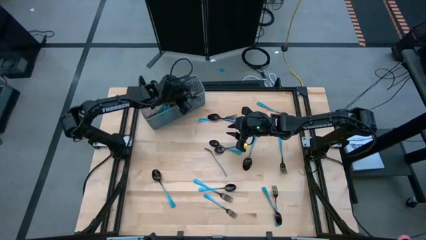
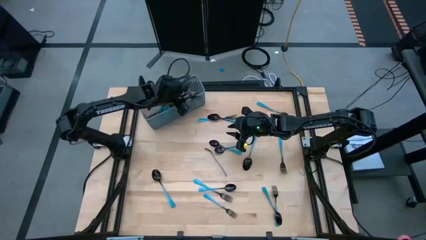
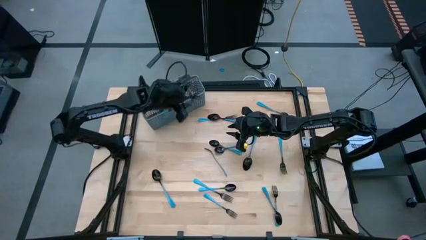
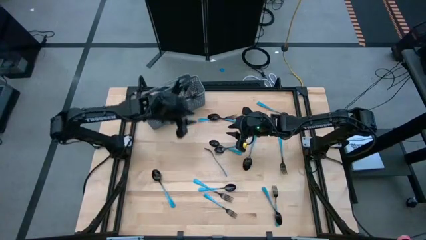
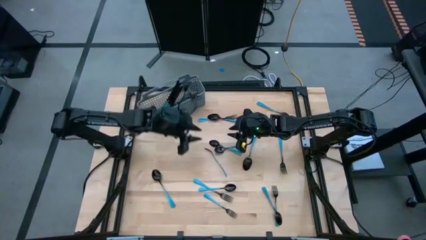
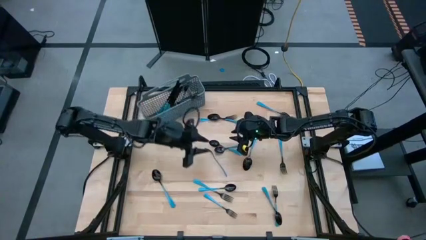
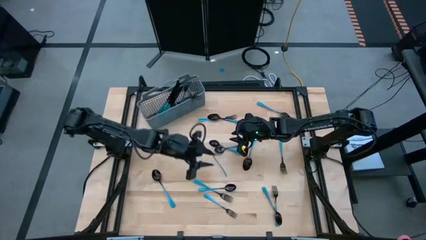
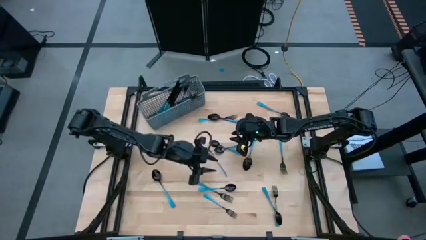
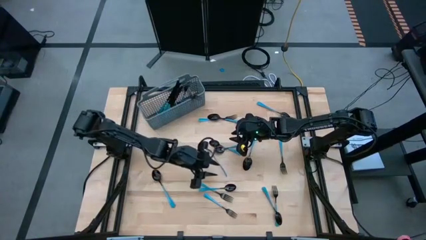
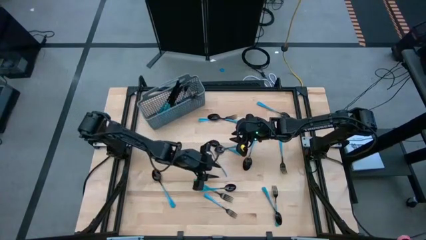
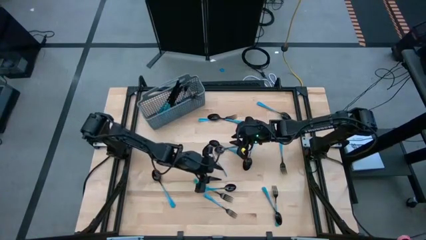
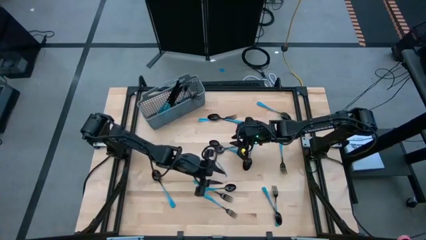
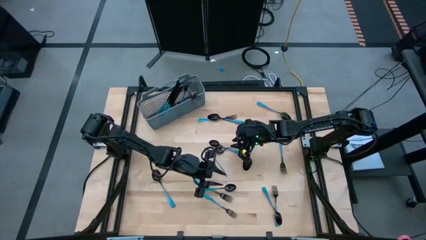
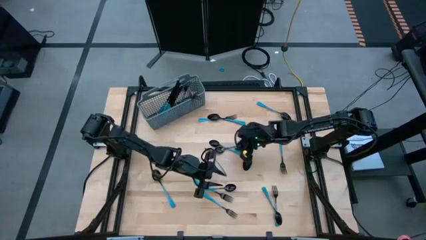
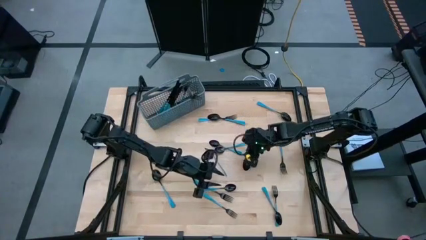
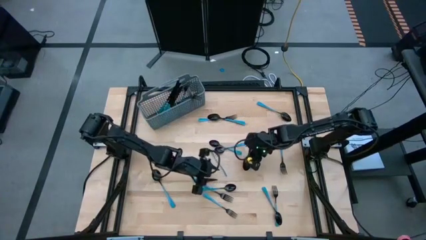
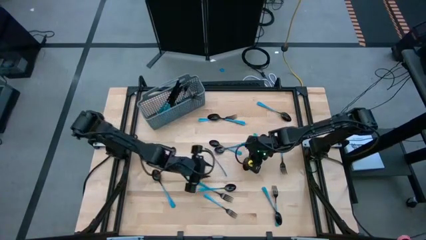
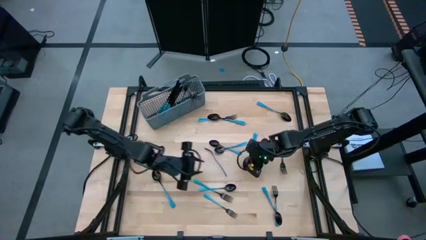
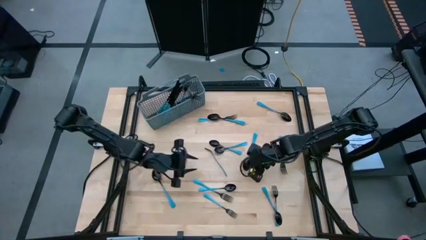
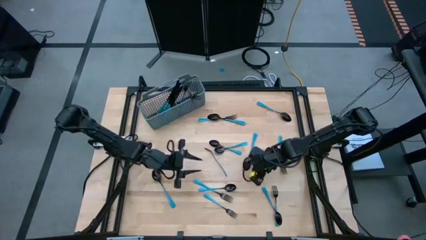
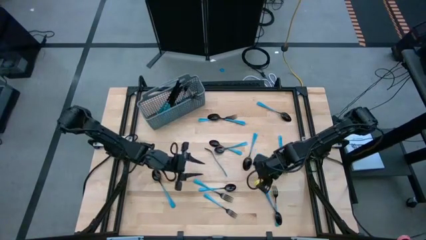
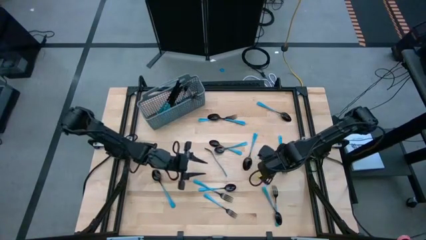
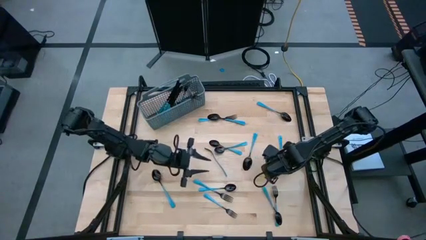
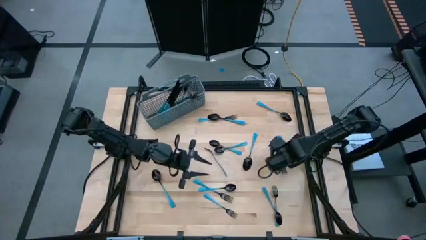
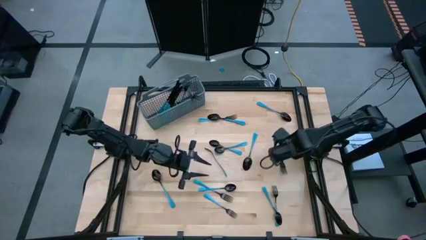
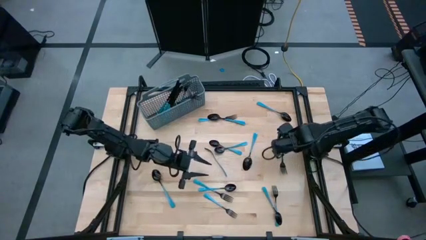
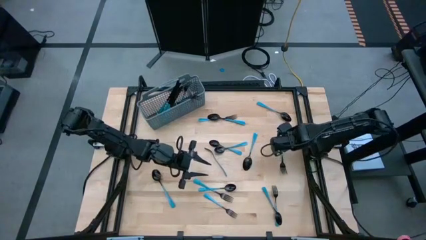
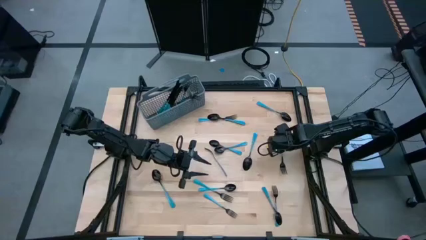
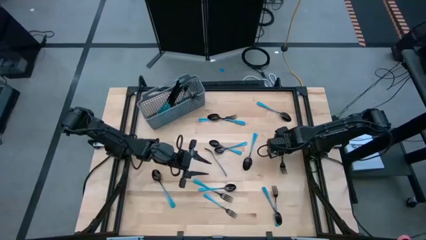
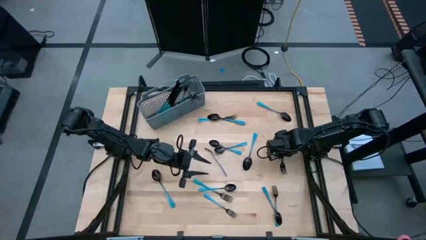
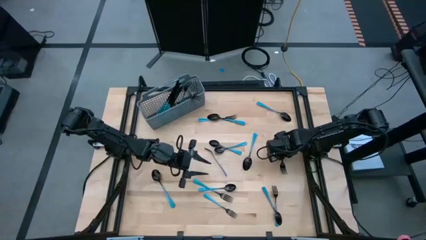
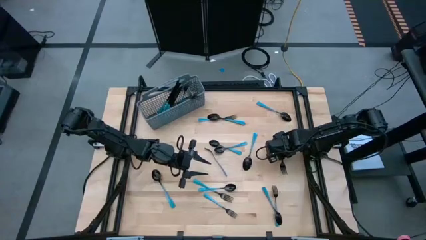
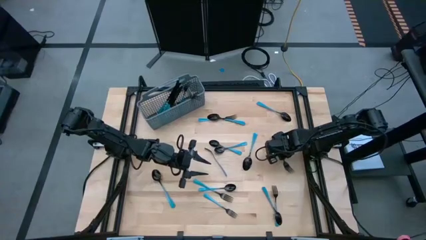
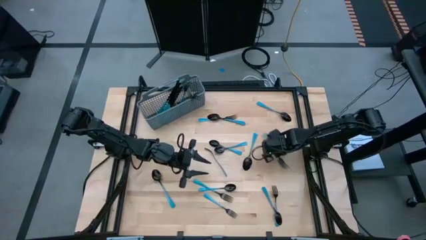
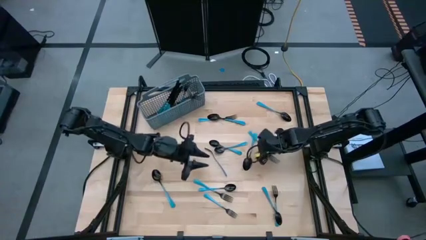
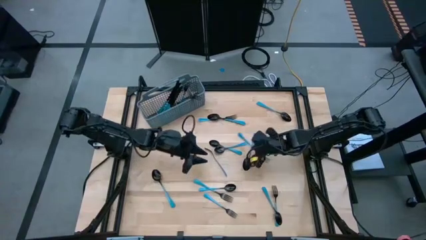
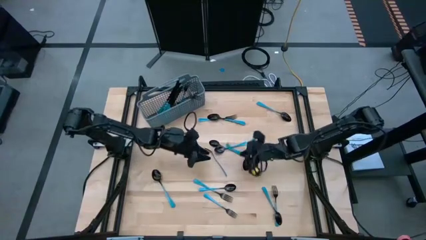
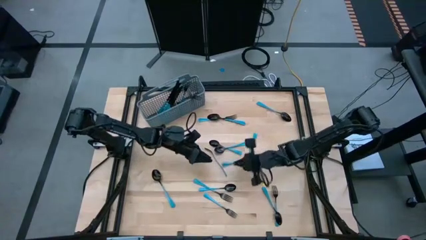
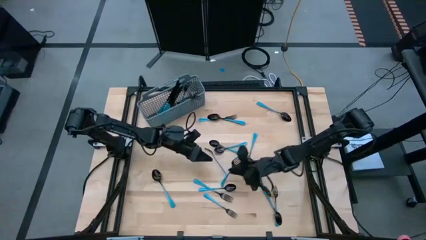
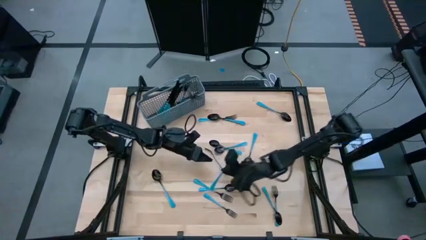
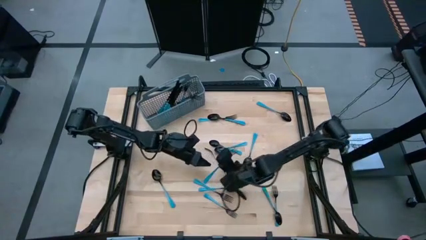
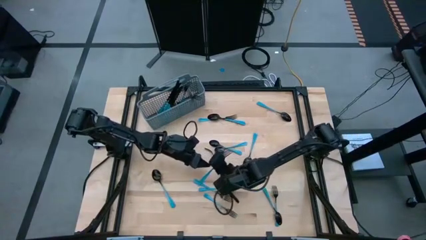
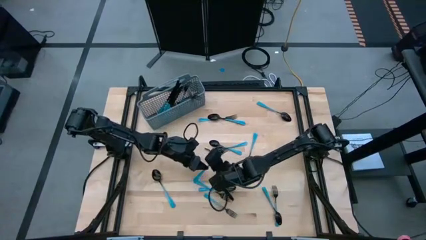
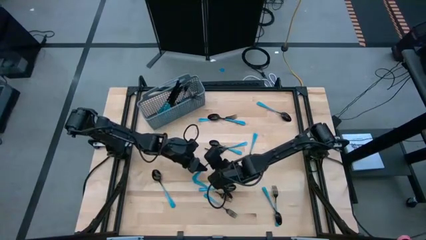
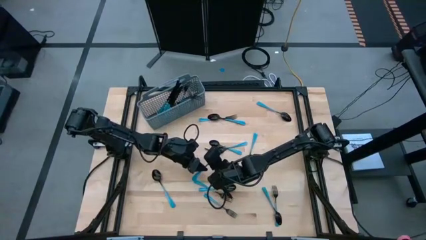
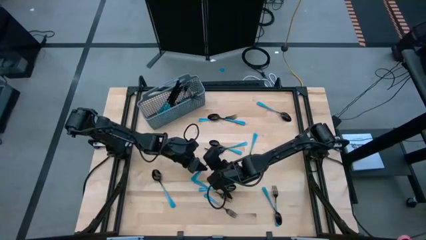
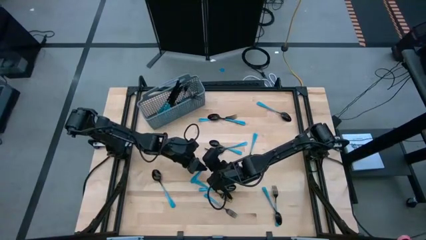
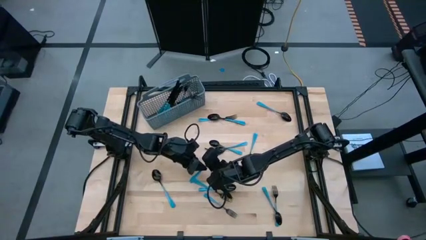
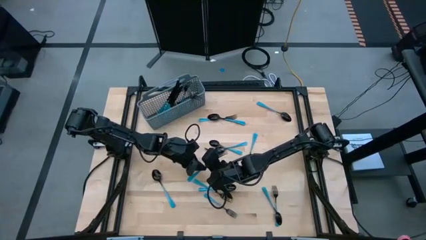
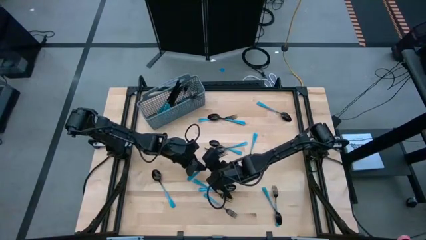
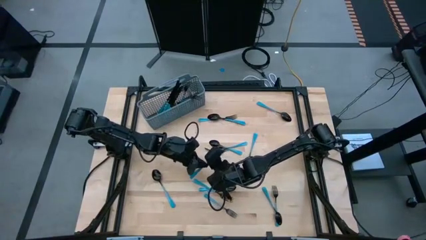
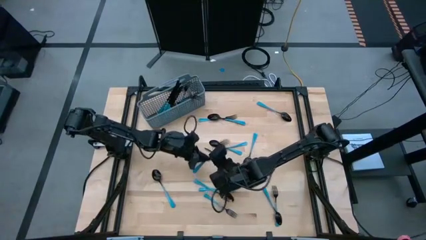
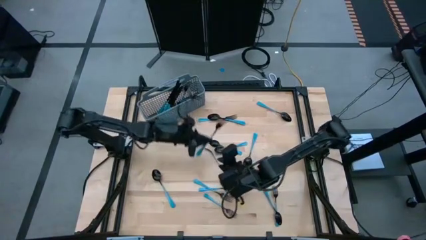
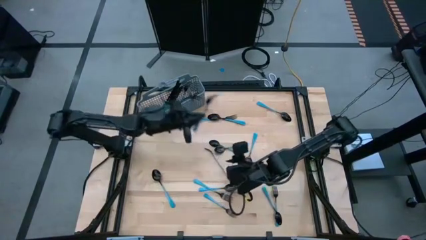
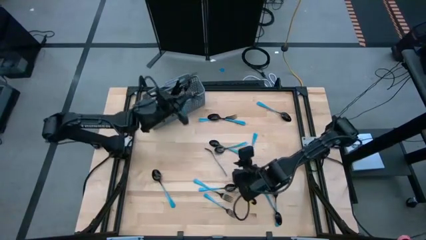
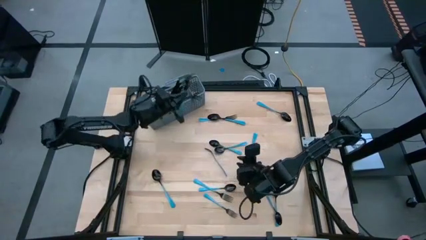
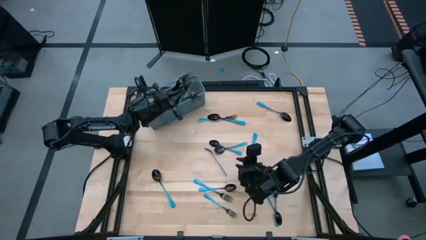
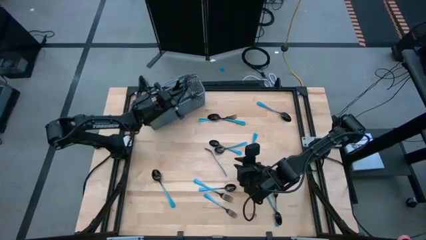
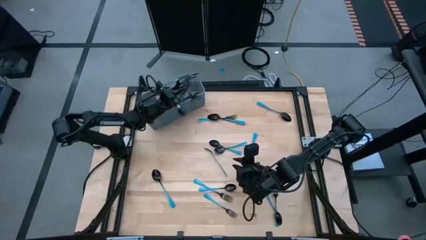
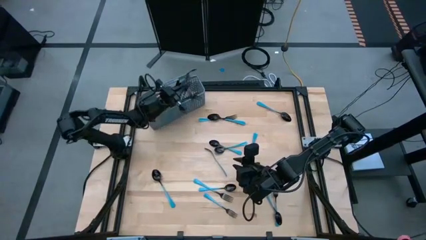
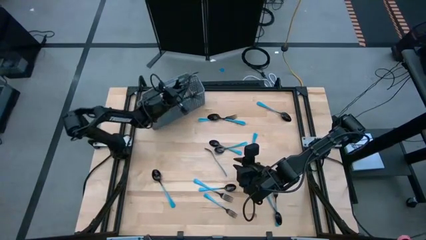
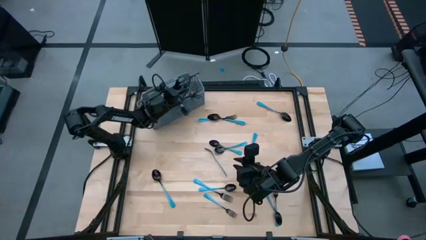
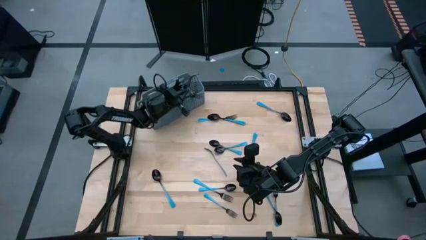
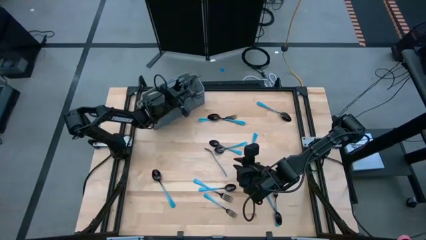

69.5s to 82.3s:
Task: Sort silverware
Put the blue fork in the silverware rack

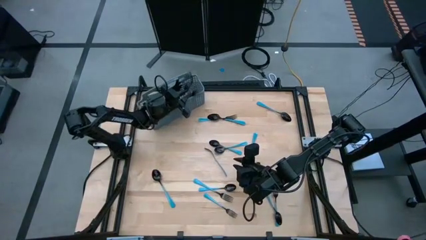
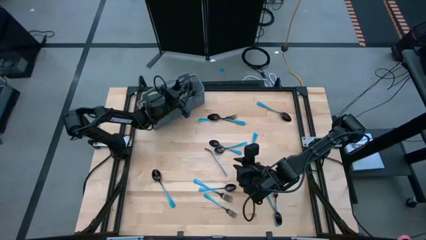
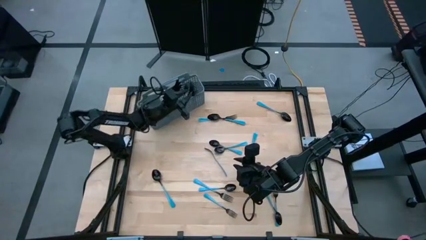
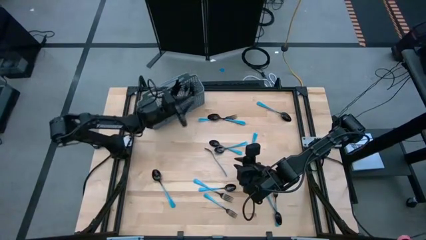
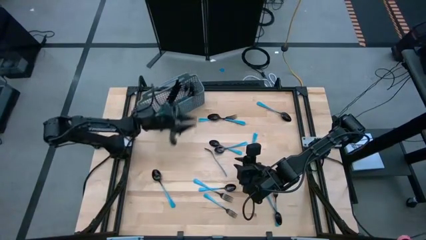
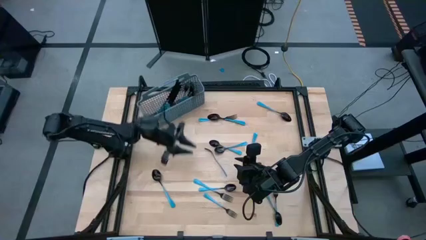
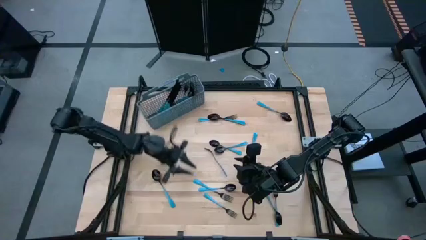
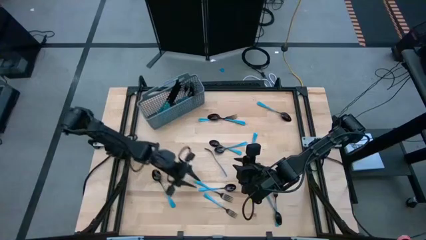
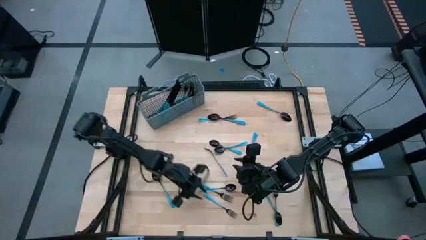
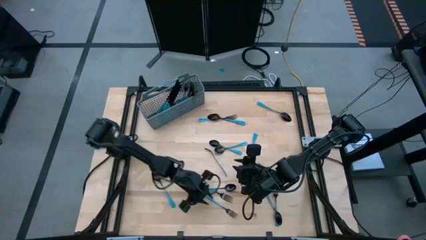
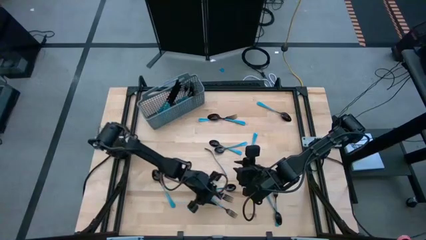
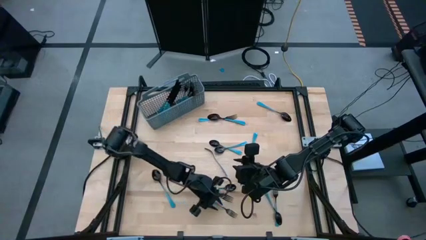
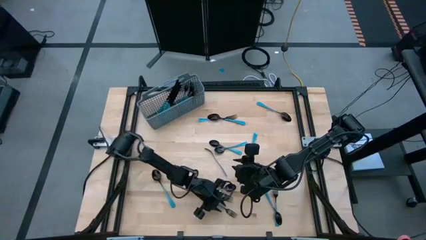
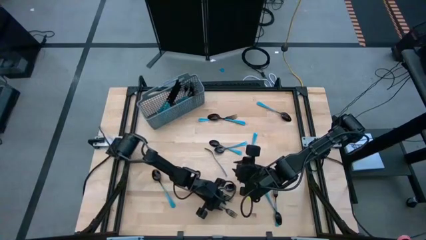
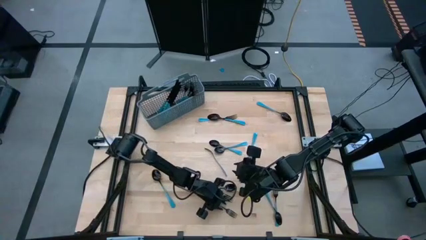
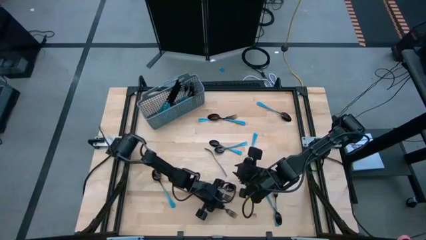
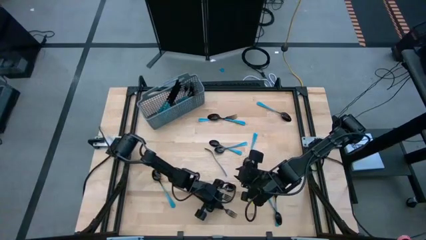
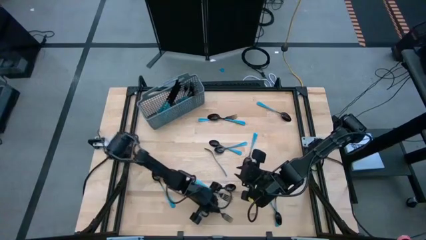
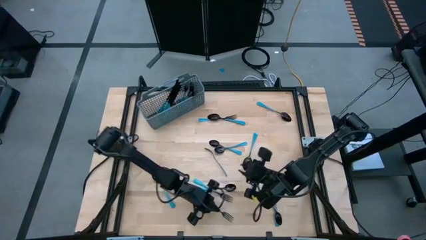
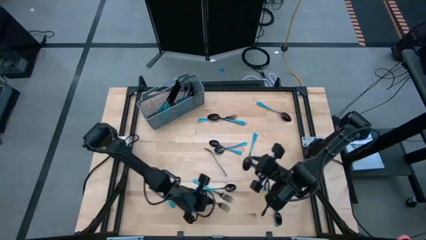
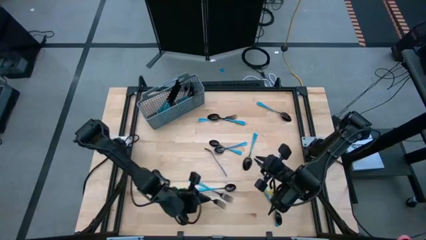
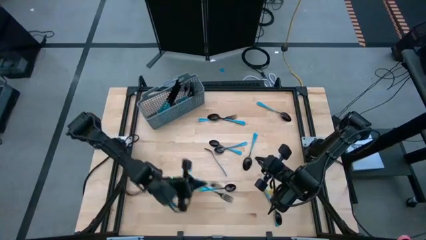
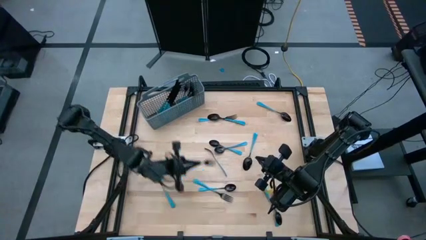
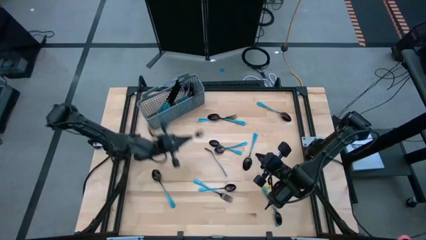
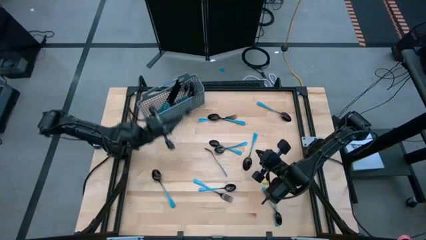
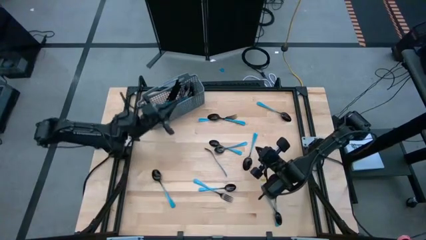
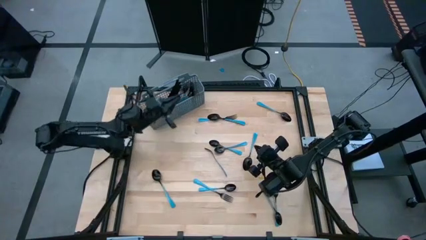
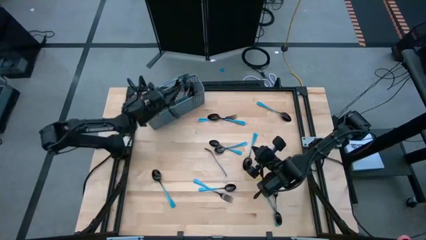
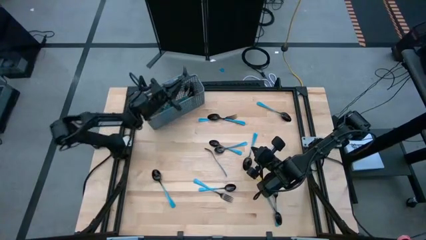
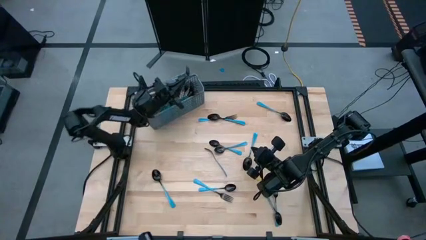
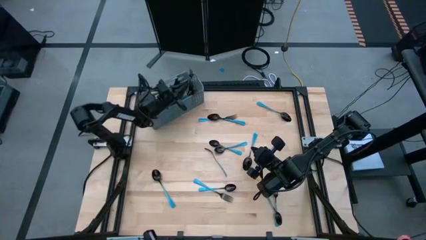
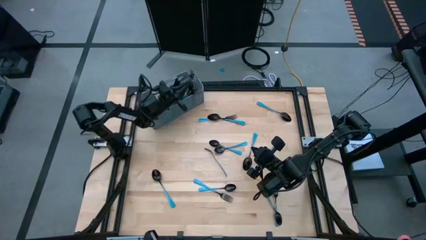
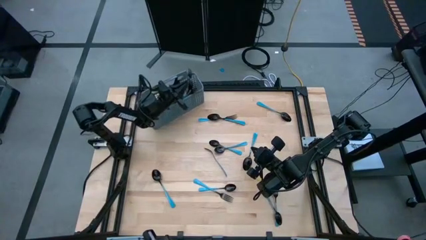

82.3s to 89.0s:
Put the blue fork in the silverware rack
